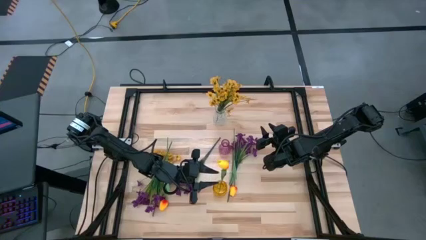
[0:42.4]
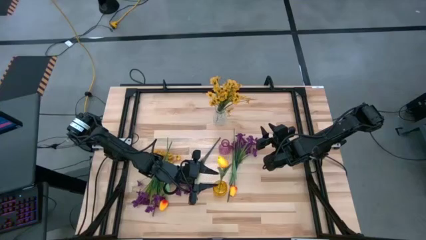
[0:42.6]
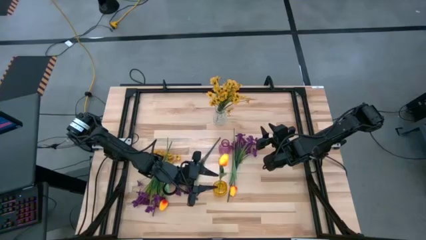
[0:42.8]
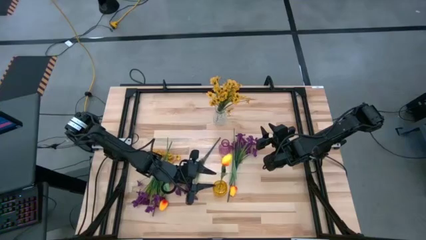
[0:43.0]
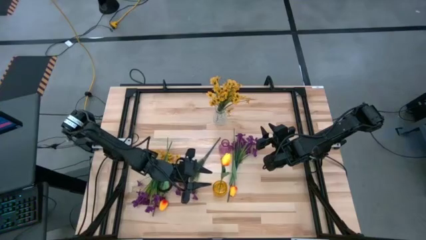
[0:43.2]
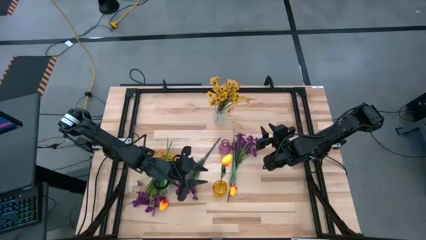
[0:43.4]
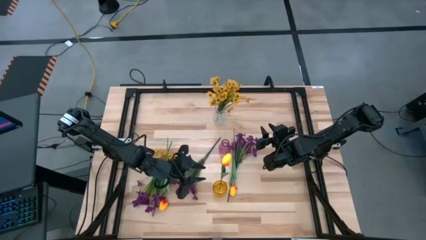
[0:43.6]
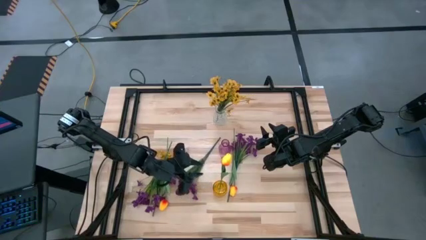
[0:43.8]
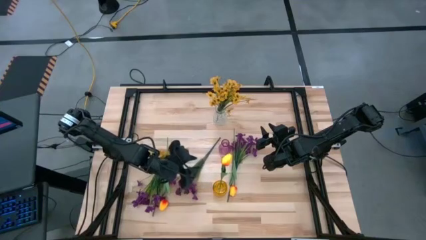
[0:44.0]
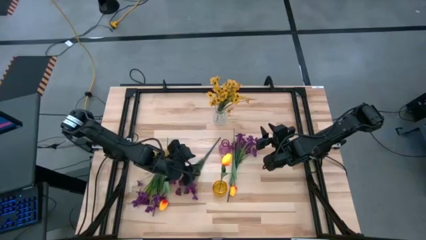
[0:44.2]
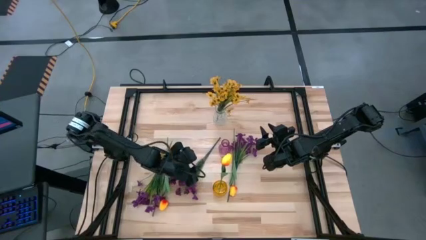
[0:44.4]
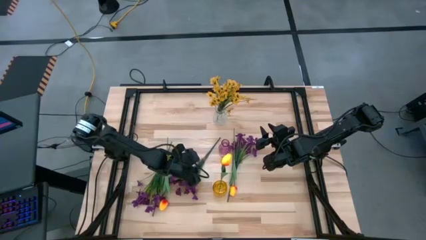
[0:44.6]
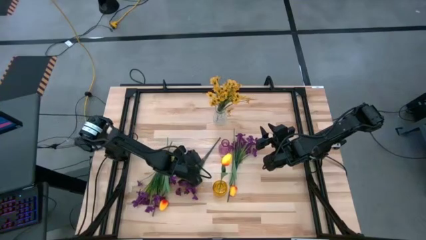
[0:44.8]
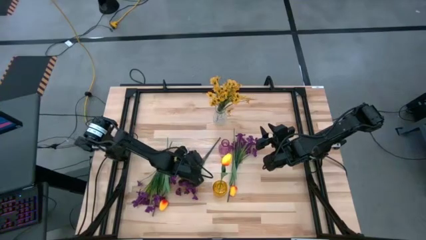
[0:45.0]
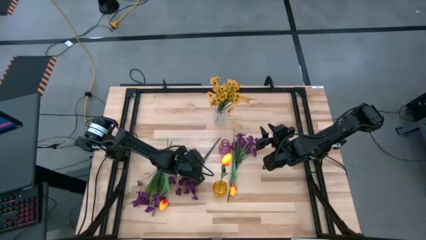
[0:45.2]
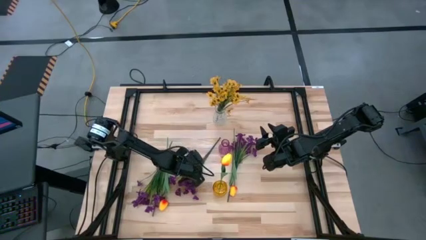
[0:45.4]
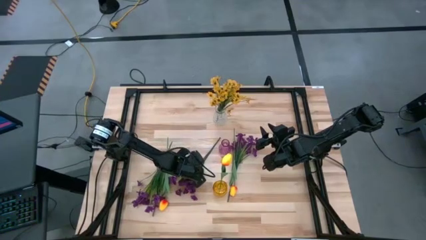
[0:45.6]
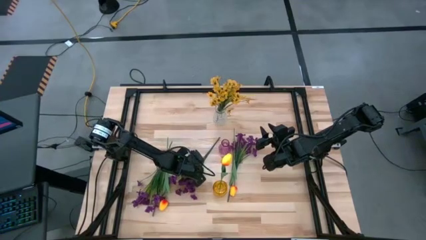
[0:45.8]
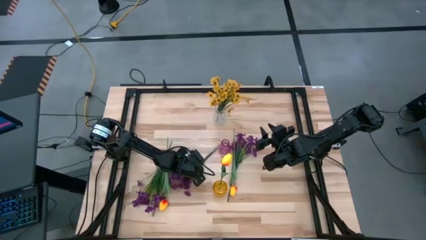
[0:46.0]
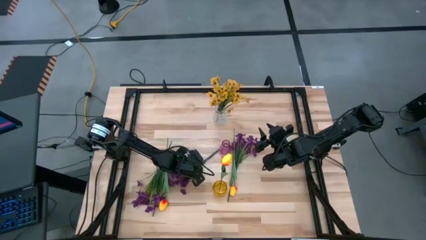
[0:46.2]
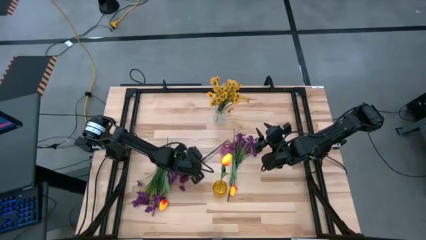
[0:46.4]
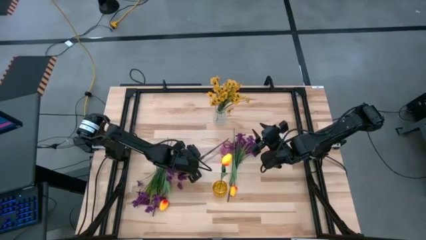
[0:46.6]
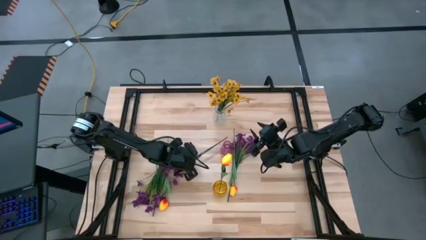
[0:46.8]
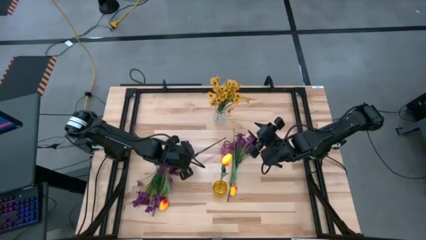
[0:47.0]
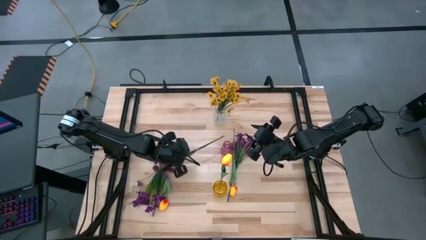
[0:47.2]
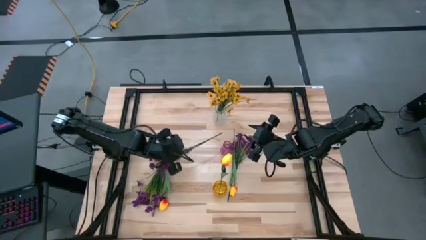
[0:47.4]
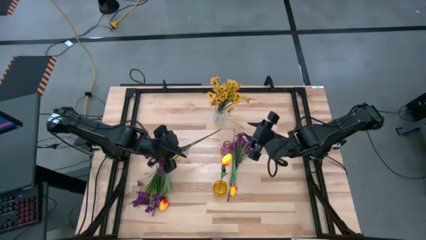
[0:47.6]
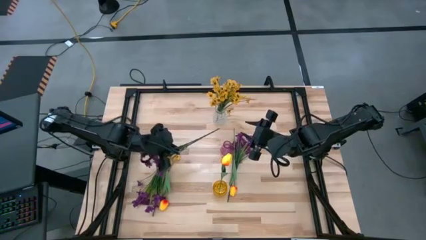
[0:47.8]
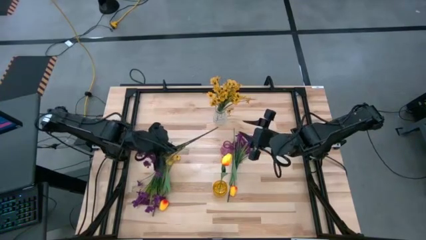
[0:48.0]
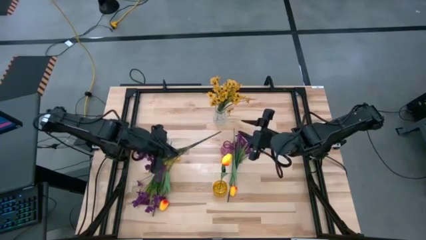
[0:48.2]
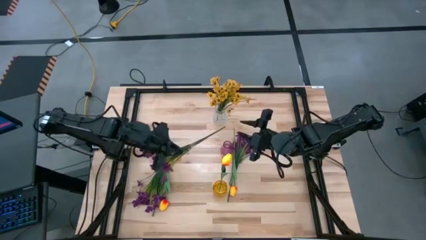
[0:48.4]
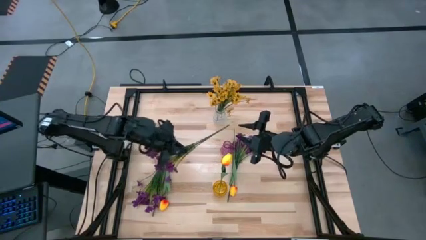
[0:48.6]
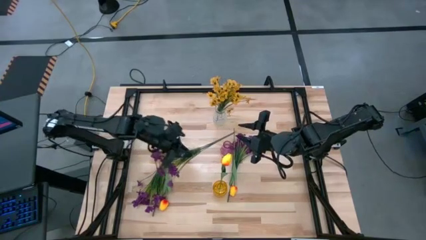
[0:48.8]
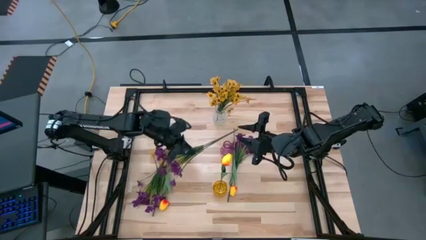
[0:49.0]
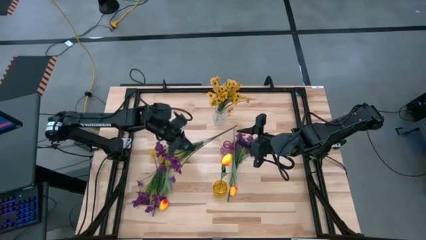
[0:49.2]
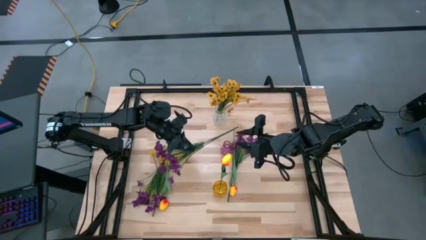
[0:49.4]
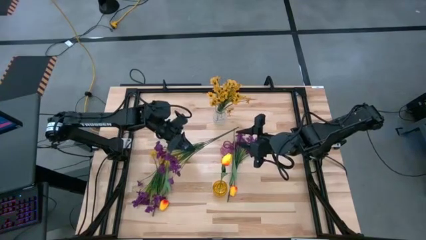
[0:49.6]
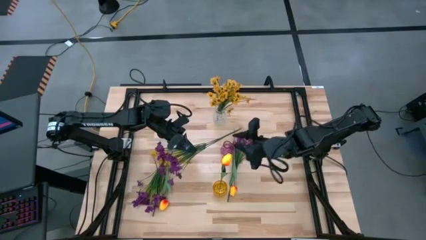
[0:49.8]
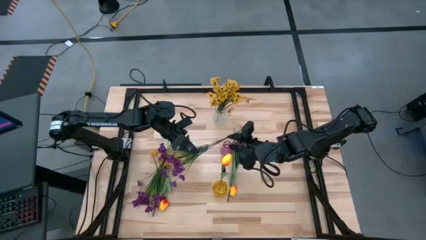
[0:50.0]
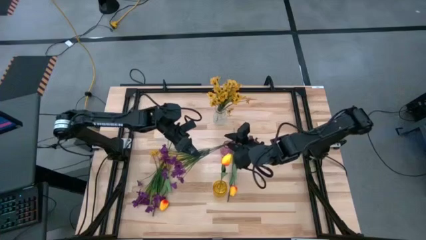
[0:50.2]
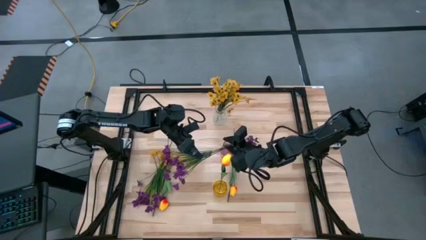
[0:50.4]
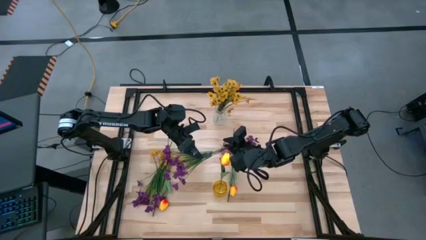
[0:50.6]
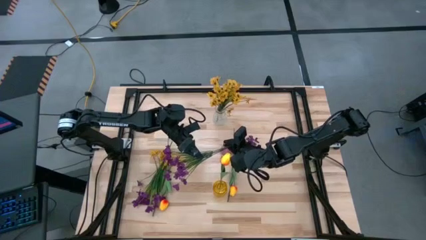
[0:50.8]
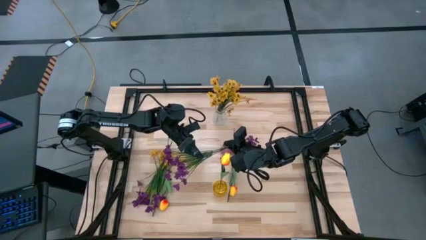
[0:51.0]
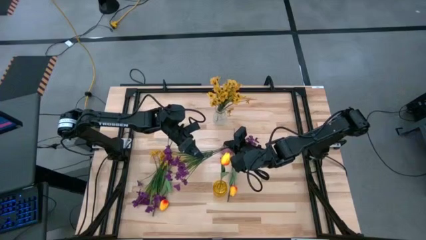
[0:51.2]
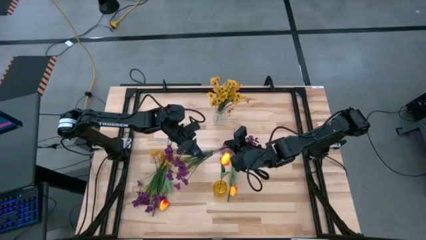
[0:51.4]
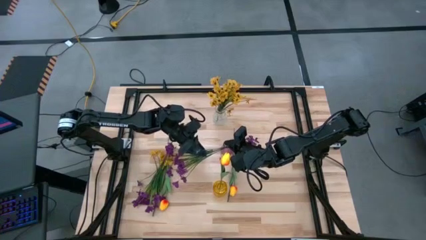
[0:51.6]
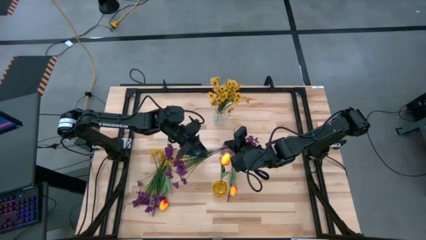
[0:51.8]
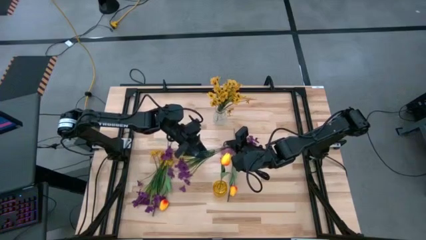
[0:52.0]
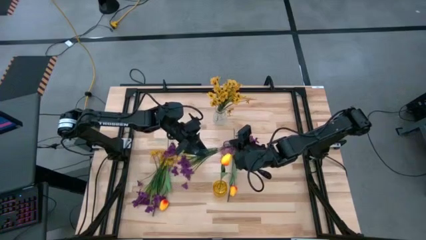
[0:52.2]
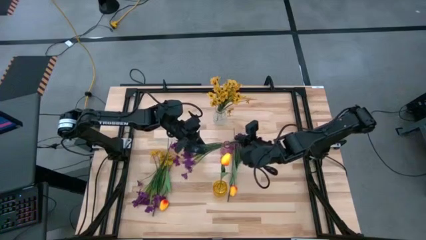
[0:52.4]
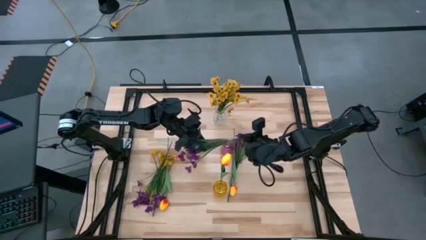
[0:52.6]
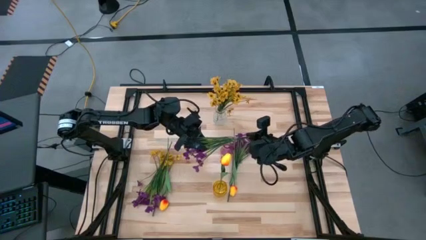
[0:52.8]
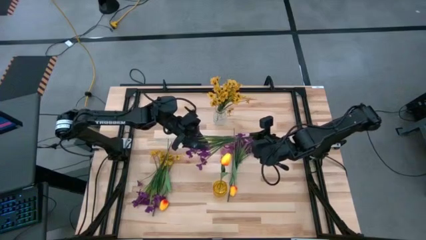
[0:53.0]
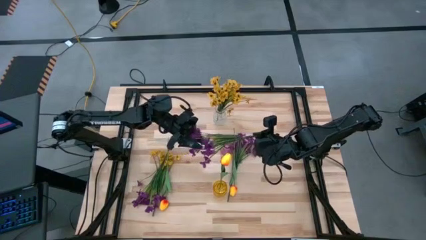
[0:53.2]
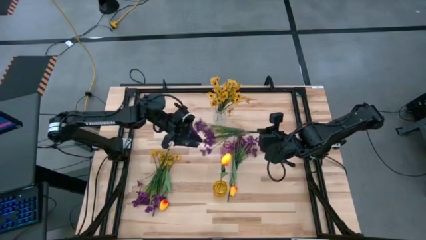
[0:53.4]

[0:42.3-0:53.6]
Task: Sort flowers into vase by color
Put the middle violet flowers into the violet vase
